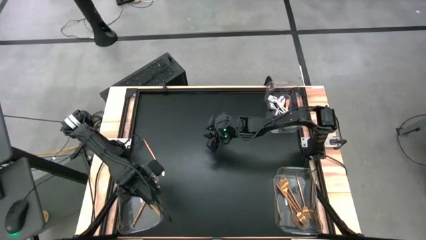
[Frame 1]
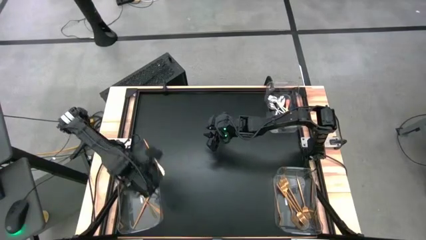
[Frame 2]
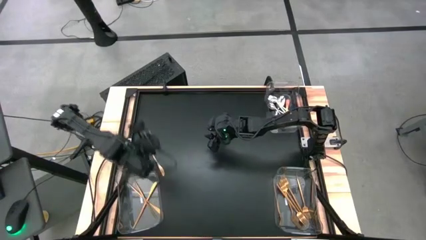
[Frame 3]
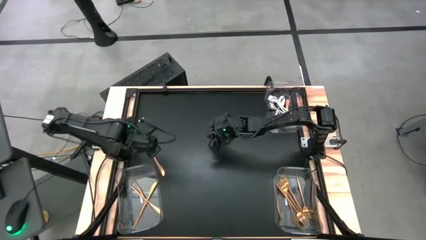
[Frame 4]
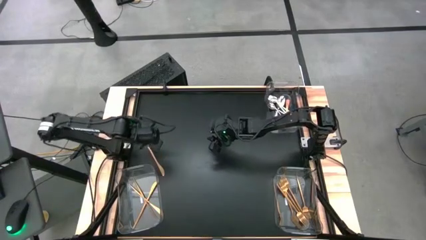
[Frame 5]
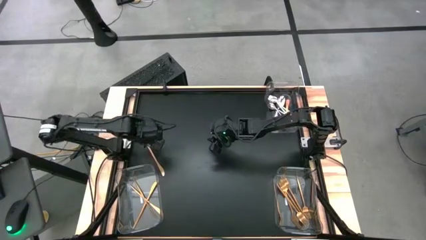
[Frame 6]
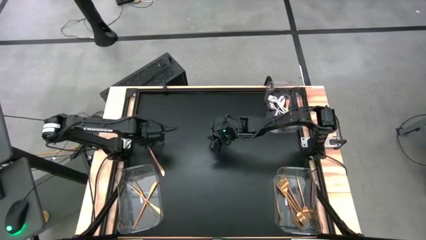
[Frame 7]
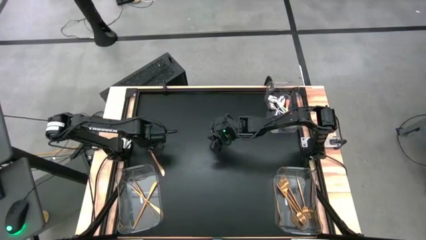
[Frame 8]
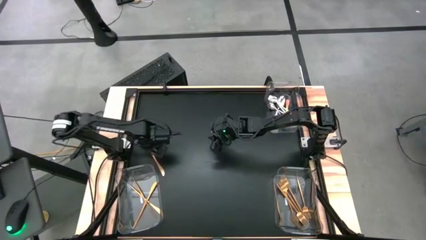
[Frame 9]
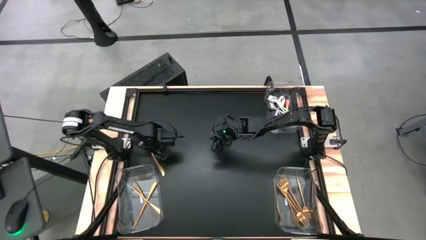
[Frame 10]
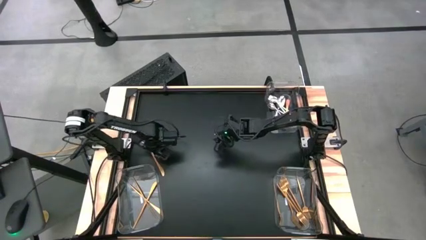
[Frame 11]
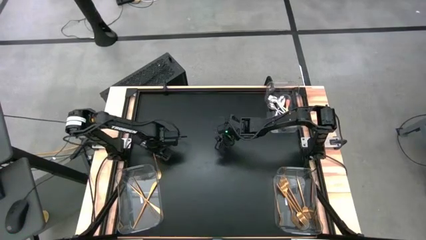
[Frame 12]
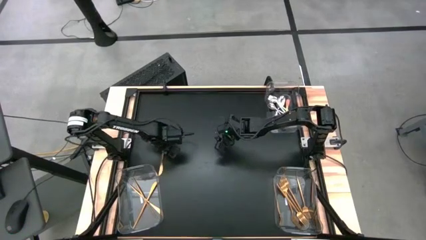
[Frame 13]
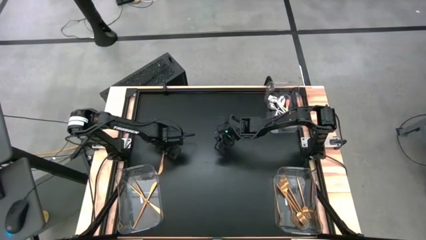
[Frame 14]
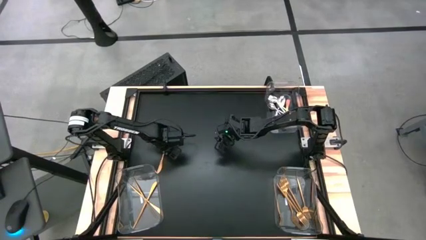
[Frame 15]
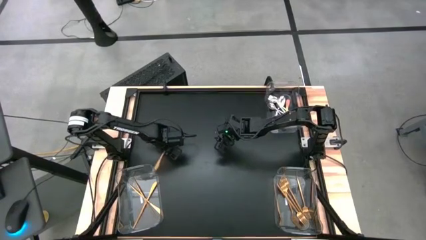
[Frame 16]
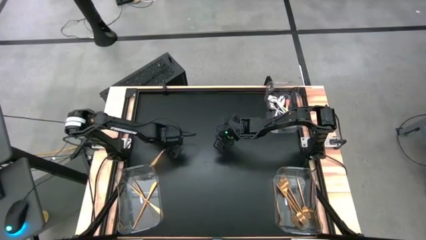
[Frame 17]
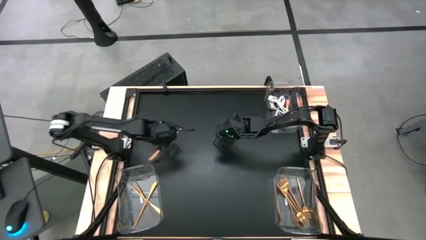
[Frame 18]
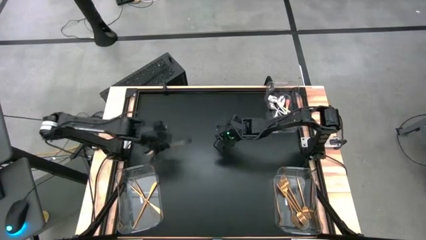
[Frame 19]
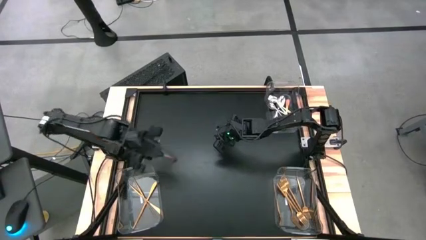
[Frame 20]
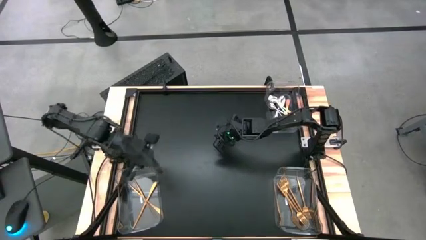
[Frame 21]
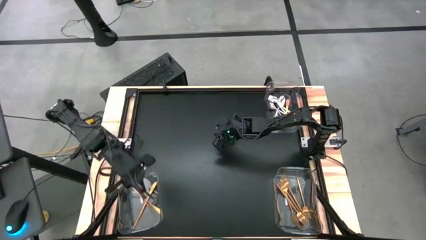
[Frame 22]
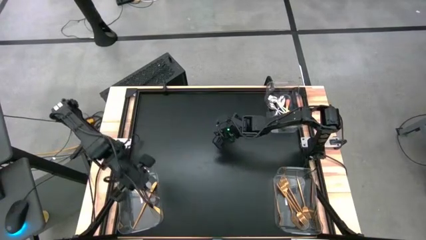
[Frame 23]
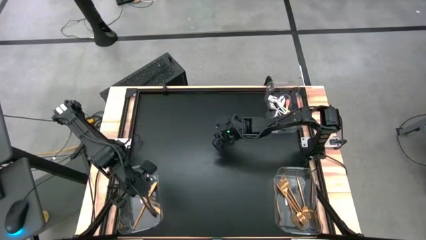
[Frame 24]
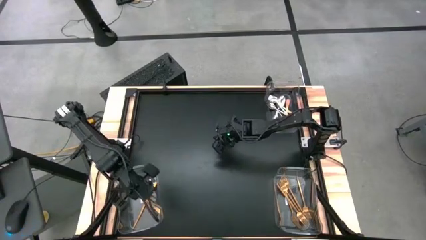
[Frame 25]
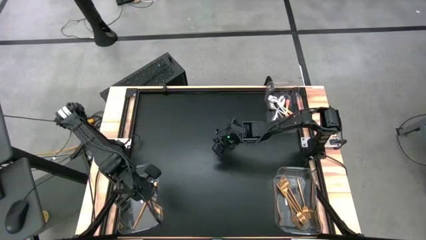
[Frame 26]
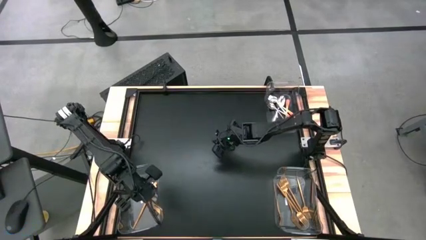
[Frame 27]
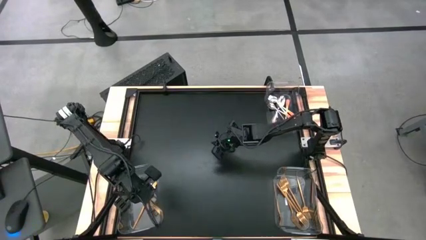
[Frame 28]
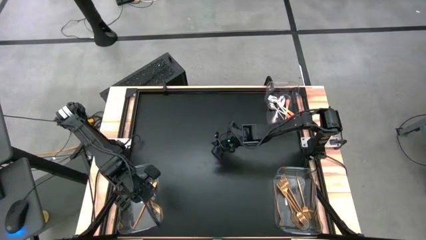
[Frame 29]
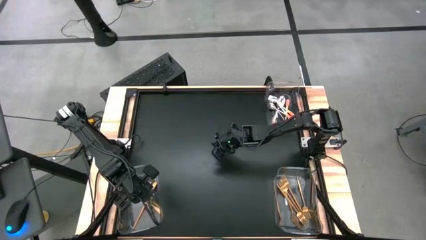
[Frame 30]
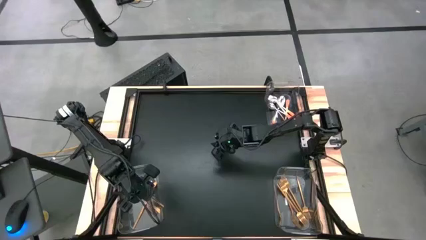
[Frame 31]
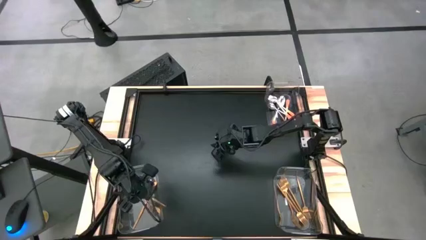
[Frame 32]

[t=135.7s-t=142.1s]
Task: Sort silverware by color (type)
Put the gold table knife into the bottom left transparent bin

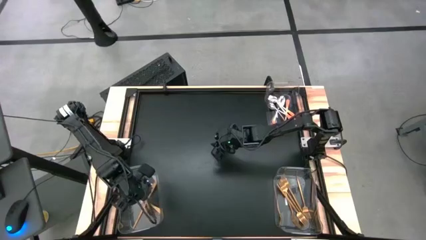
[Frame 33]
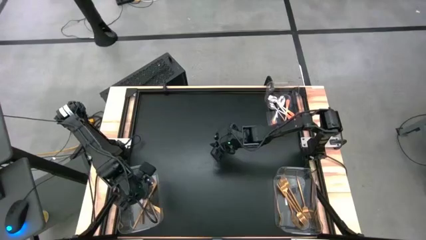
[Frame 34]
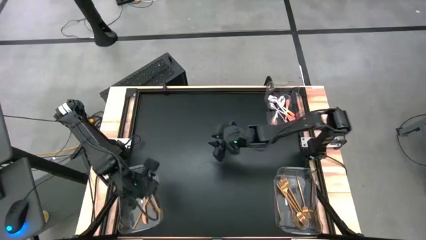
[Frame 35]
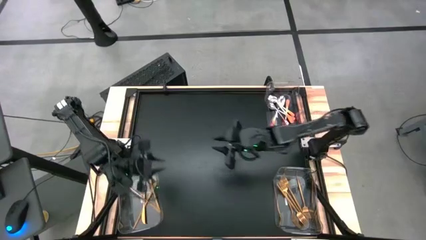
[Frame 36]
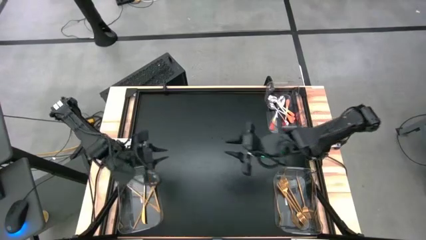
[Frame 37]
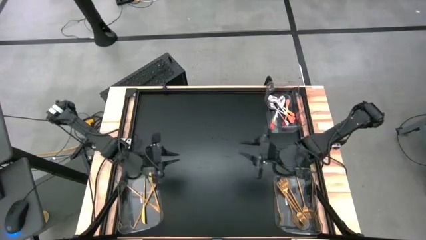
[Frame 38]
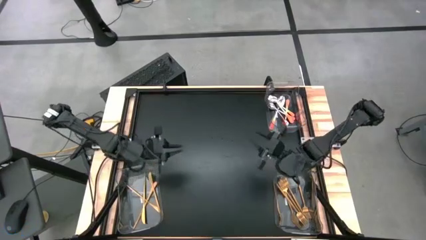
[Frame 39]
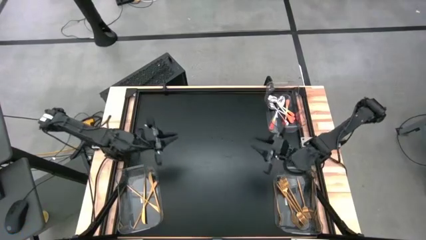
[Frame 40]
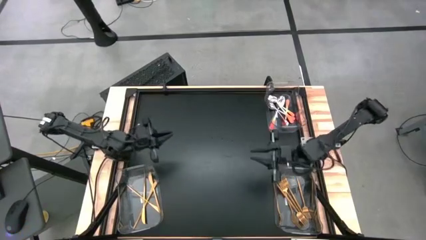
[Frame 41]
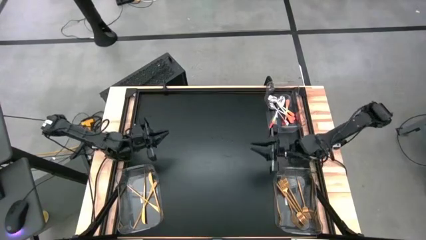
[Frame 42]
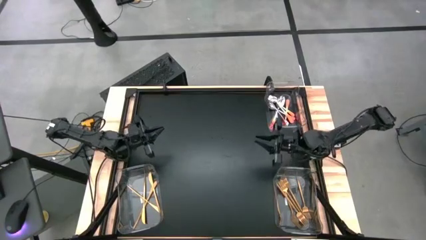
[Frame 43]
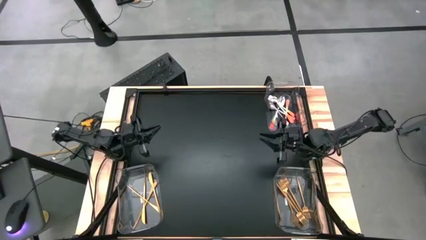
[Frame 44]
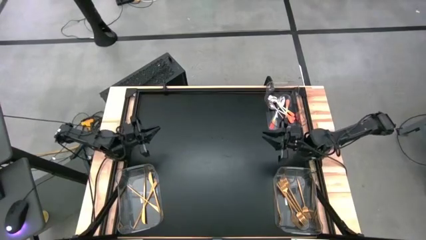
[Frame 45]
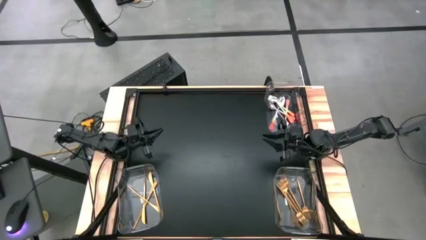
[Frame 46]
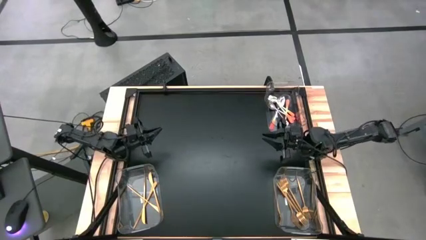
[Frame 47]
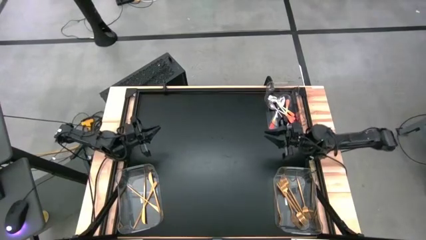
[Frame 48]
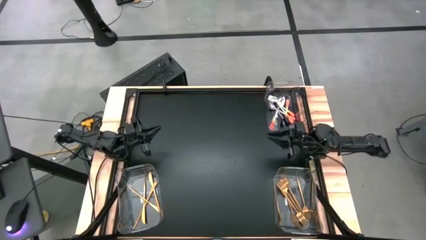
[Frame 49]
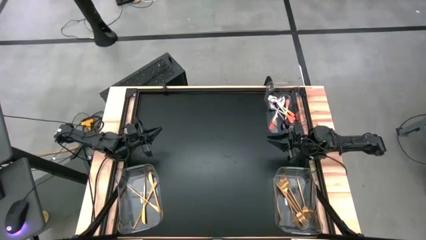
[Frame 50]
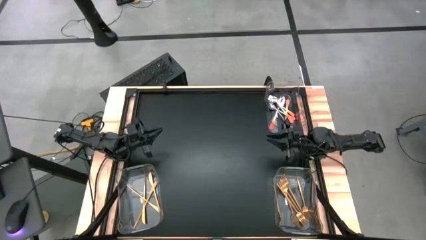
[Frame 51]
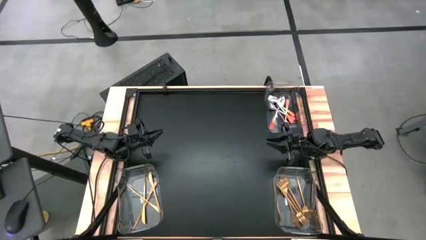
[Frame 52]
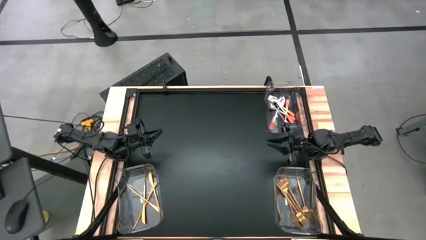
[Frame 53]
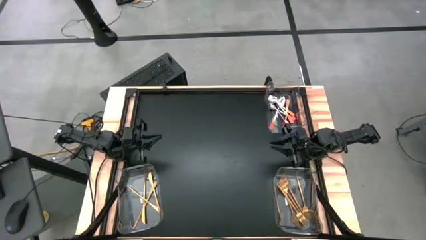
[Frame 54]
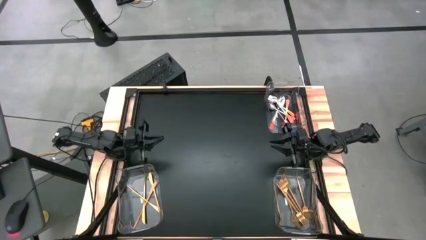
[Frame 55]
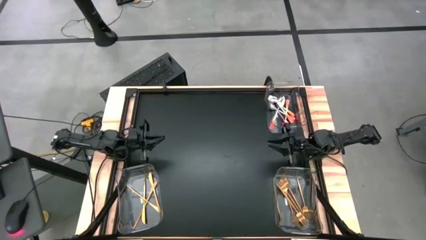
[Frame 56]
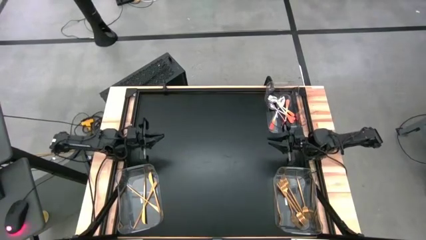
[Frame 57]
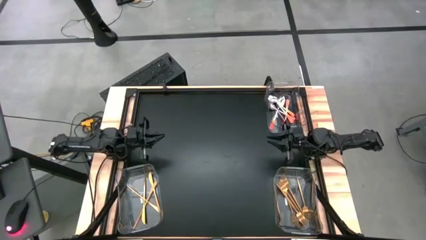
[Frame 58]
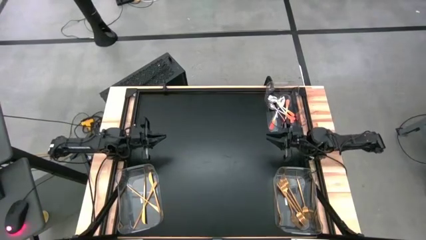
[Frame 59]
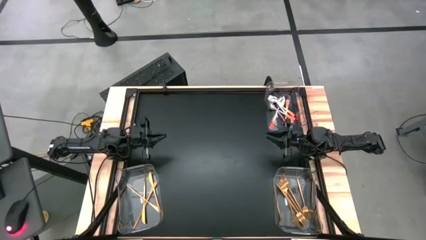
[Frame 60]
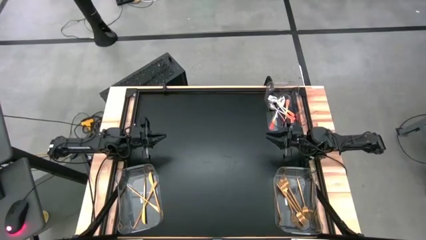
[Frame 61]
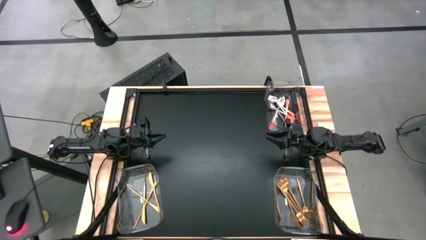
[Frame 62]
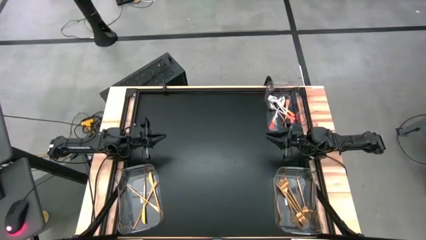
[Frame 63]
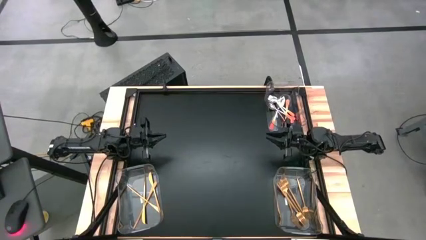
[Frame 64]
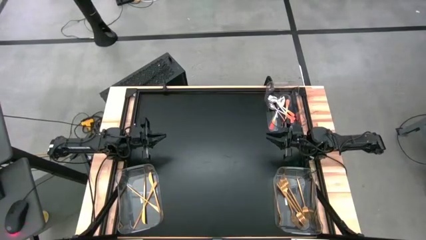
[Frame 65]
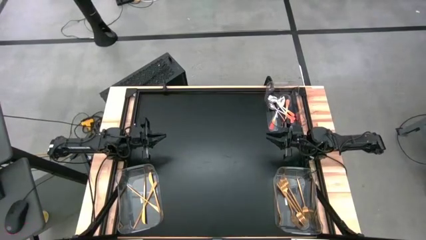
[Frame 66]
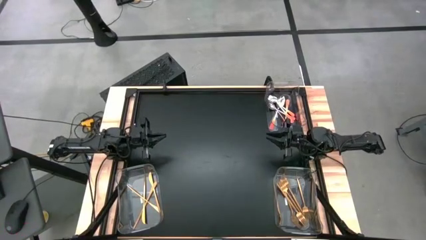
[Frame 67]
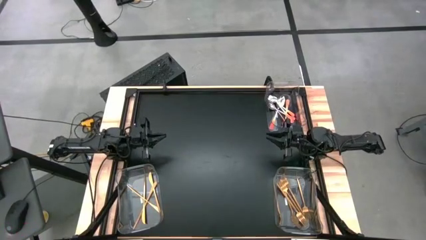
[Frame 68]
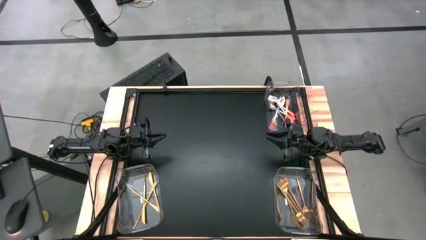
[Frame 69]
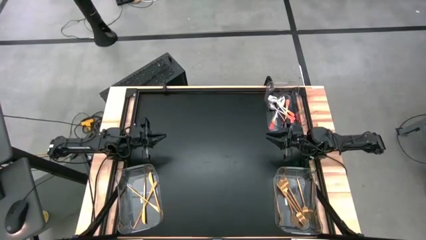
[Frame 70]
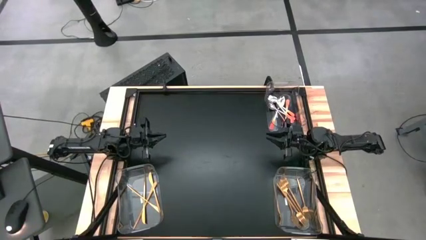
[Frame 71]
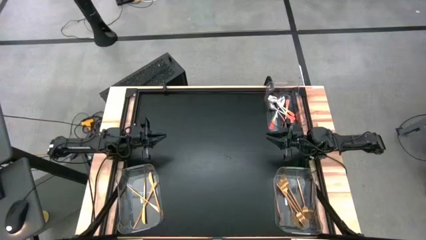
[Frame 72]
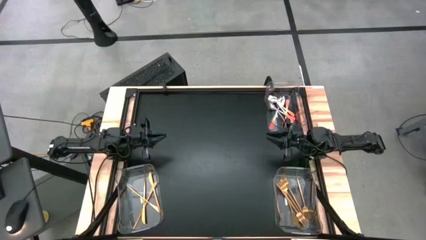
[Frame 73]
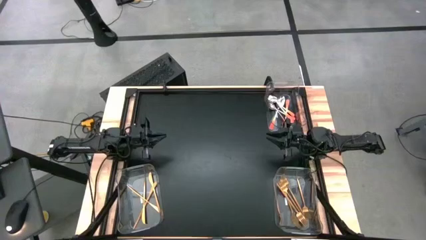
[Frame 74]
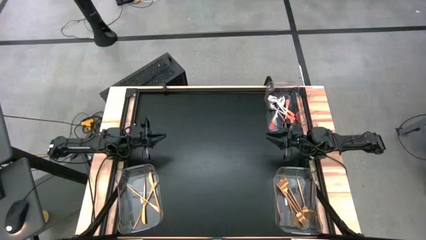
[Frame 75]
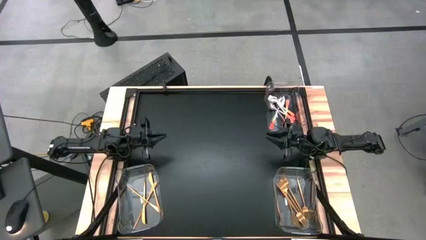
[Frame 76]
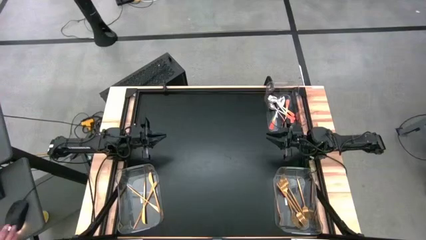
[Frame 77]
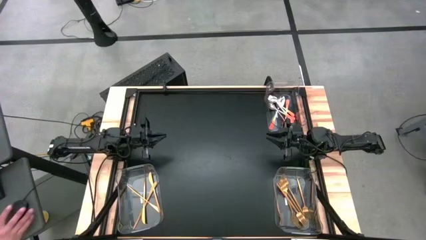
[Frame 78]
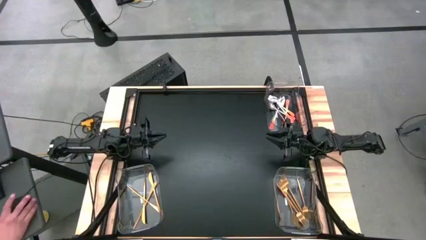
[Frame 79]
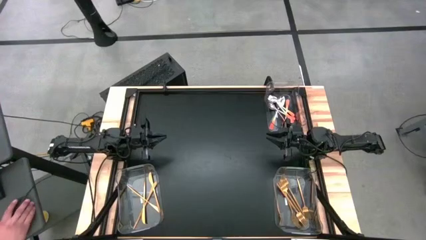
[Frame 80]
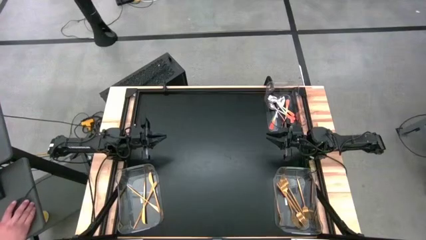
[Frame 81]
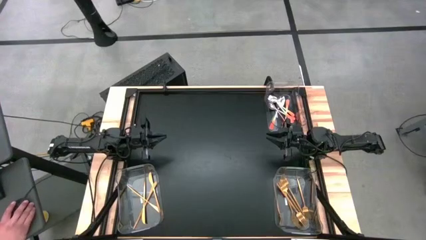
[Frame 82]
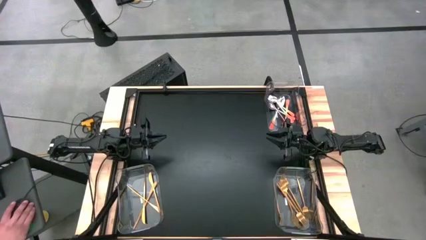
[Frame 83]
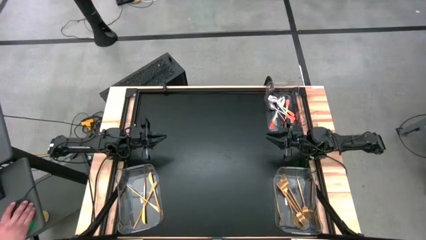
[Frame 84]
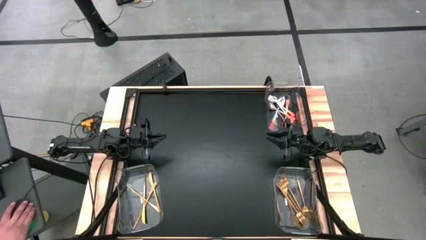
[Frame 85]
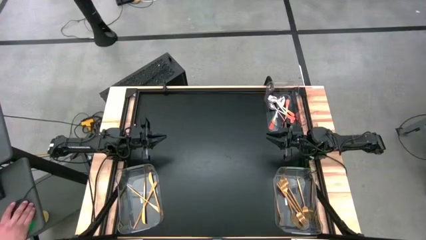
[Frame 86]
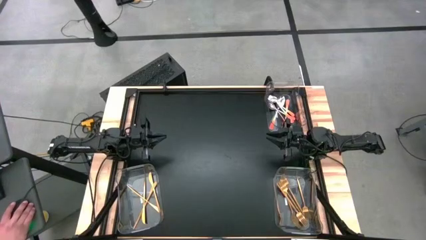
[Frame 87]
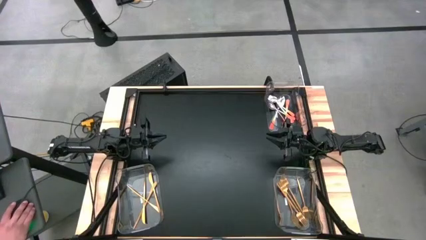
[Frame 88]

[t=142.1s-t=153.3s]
Return to Home Position
